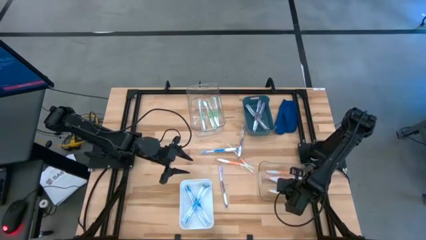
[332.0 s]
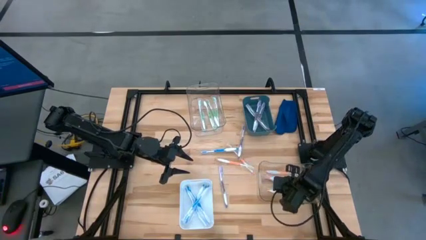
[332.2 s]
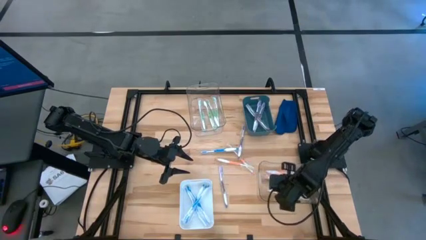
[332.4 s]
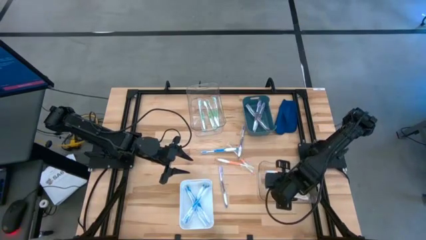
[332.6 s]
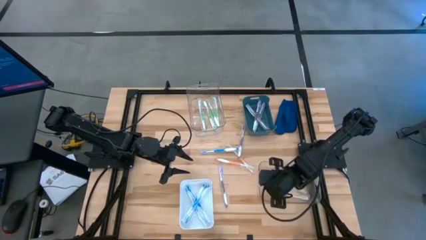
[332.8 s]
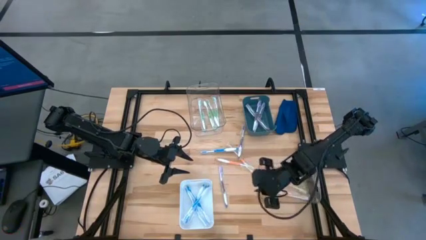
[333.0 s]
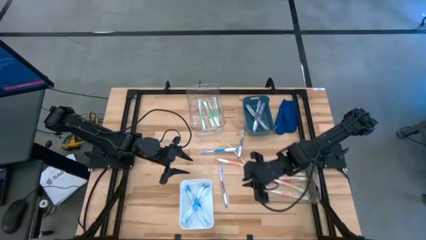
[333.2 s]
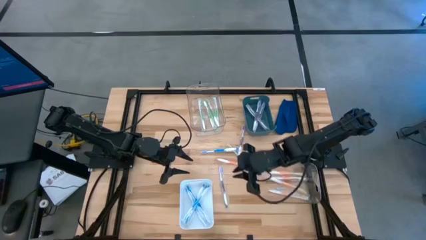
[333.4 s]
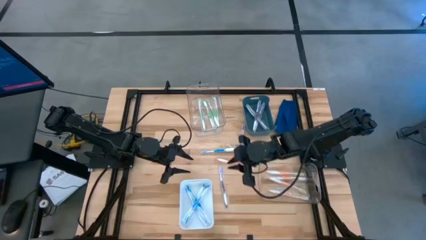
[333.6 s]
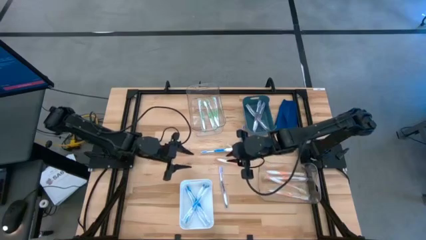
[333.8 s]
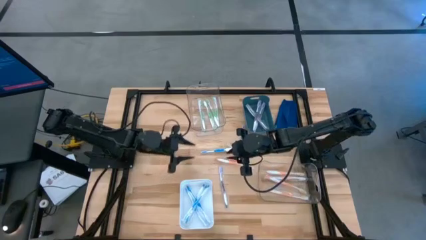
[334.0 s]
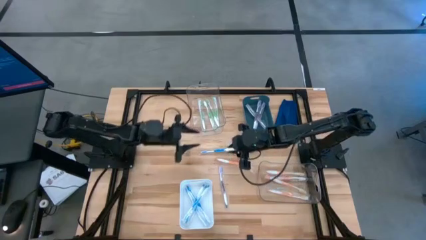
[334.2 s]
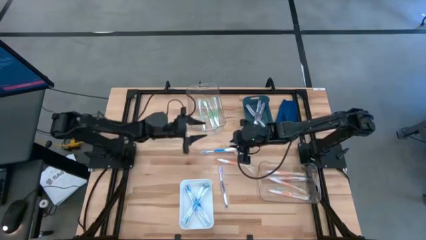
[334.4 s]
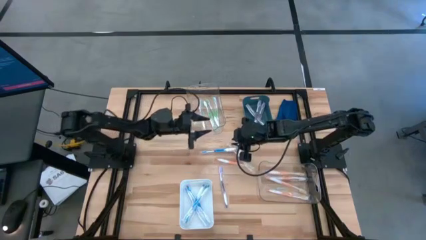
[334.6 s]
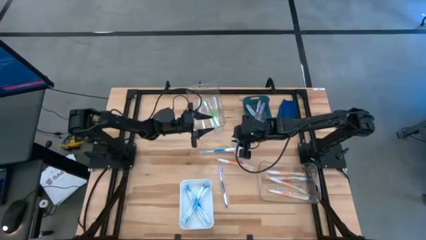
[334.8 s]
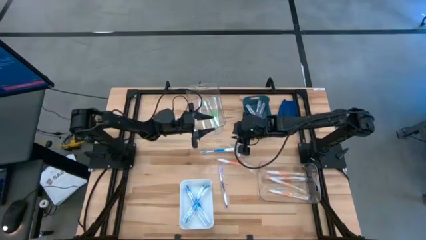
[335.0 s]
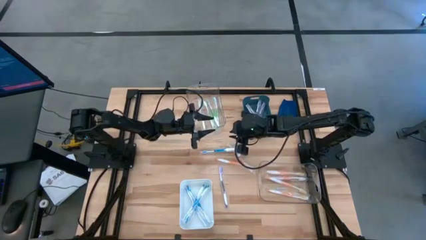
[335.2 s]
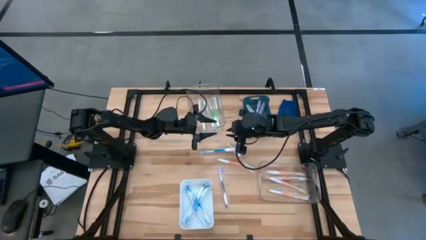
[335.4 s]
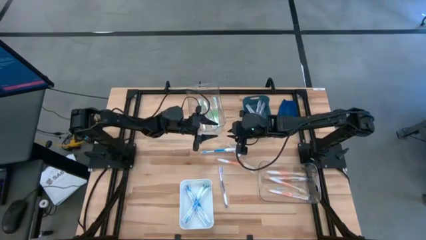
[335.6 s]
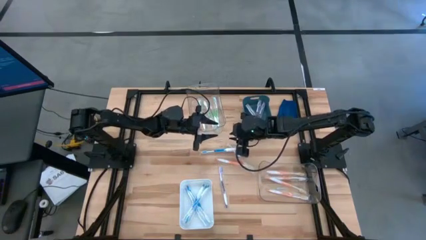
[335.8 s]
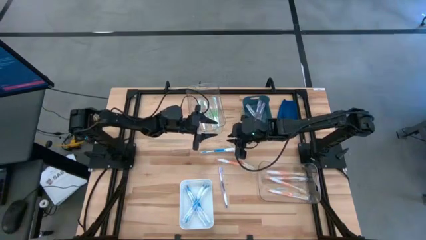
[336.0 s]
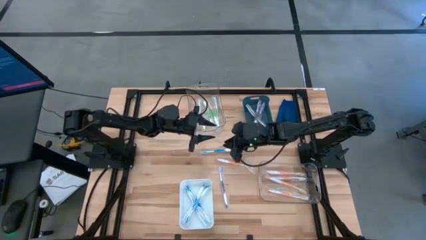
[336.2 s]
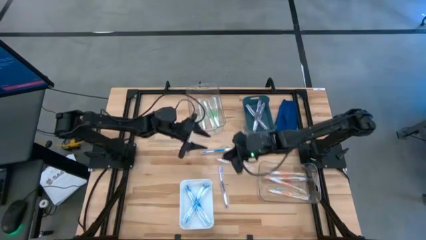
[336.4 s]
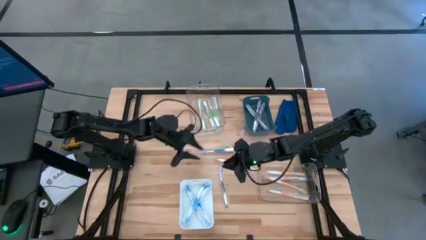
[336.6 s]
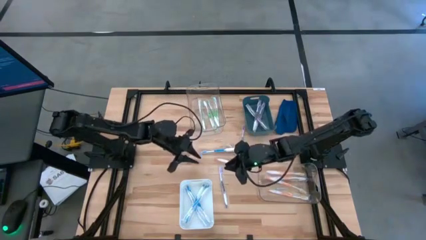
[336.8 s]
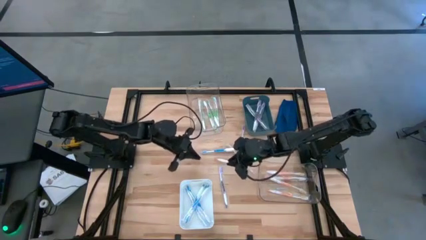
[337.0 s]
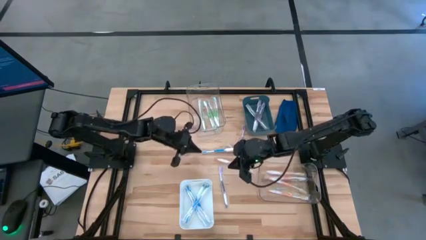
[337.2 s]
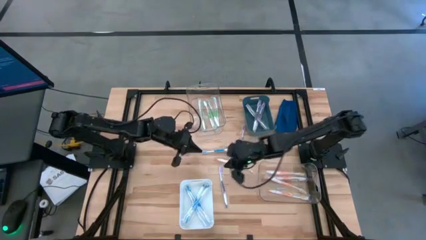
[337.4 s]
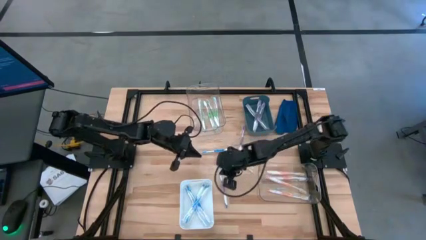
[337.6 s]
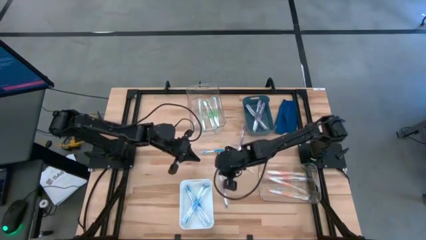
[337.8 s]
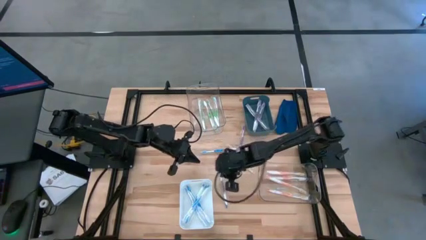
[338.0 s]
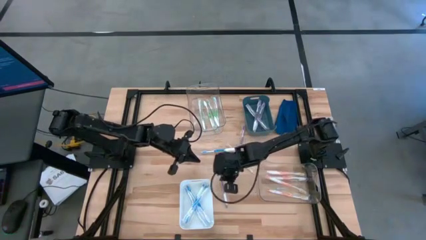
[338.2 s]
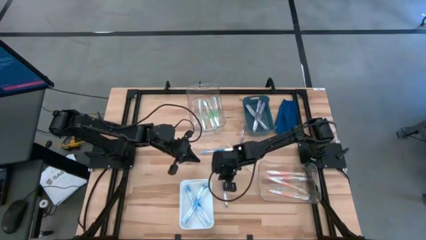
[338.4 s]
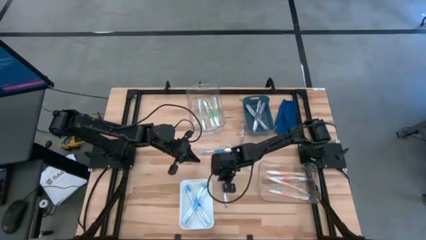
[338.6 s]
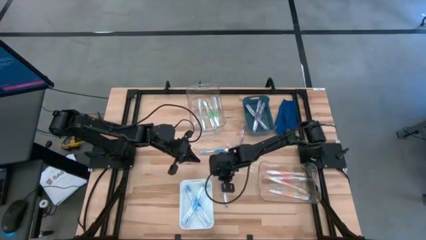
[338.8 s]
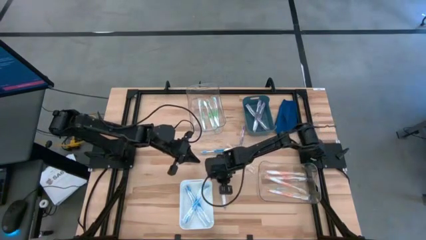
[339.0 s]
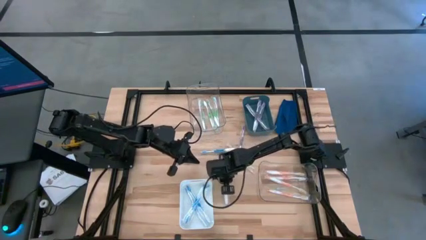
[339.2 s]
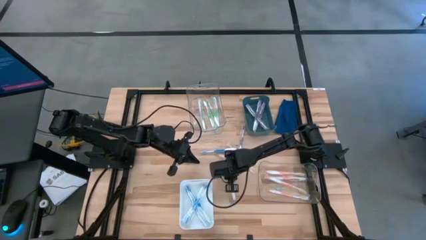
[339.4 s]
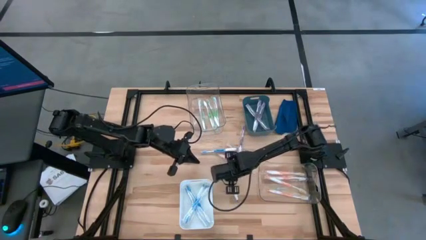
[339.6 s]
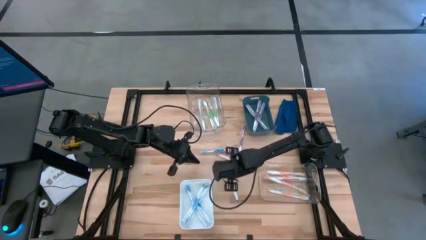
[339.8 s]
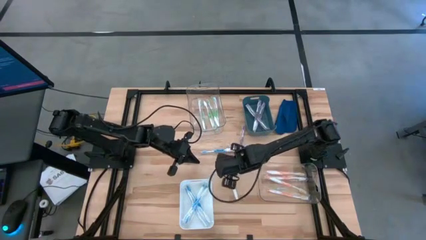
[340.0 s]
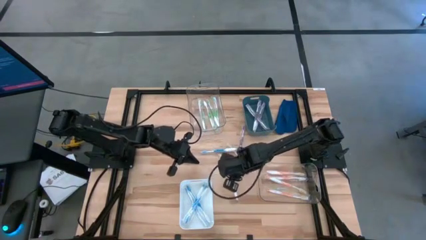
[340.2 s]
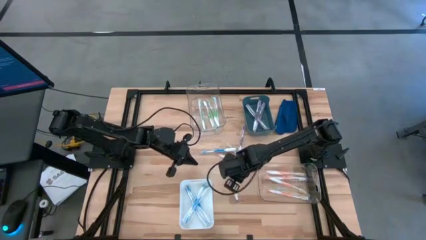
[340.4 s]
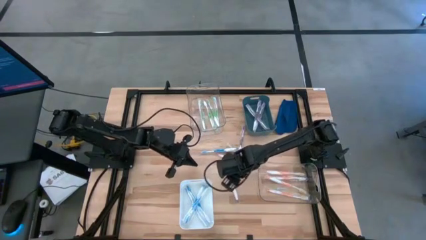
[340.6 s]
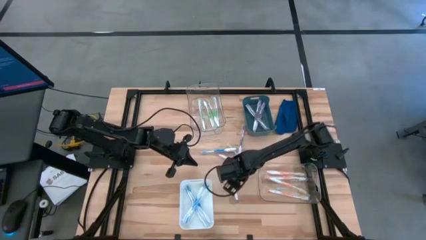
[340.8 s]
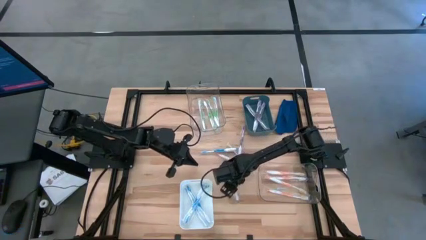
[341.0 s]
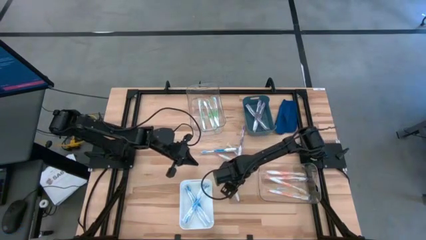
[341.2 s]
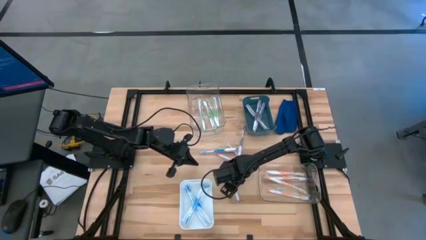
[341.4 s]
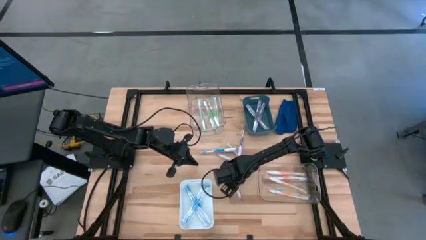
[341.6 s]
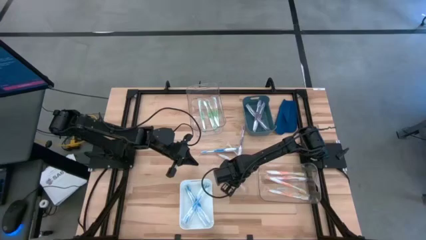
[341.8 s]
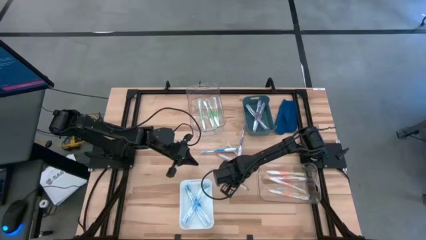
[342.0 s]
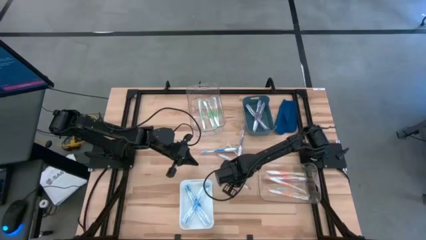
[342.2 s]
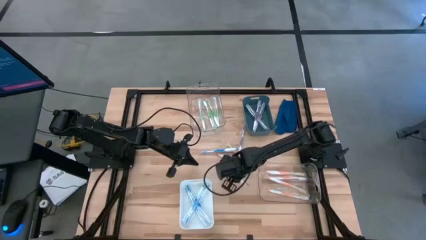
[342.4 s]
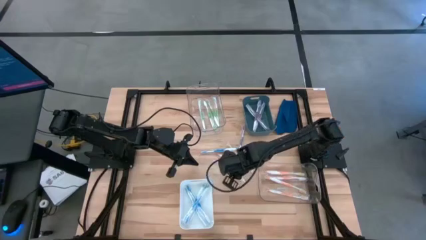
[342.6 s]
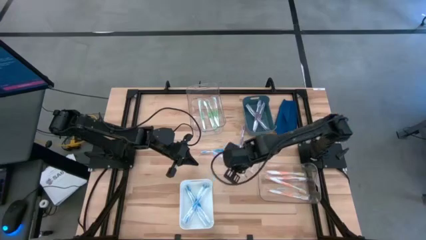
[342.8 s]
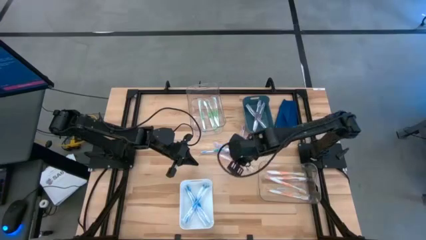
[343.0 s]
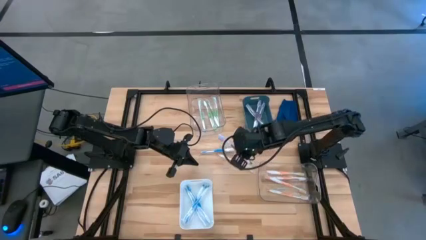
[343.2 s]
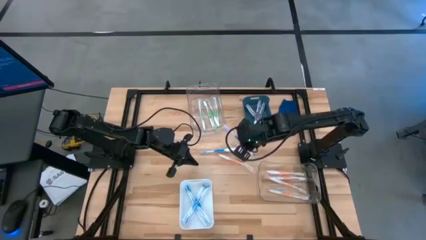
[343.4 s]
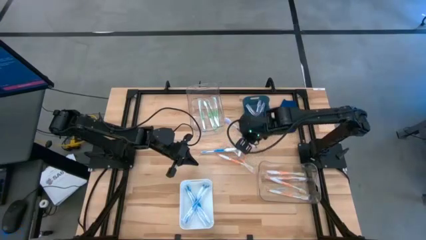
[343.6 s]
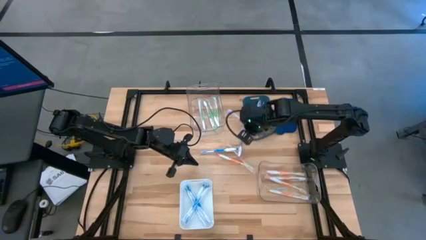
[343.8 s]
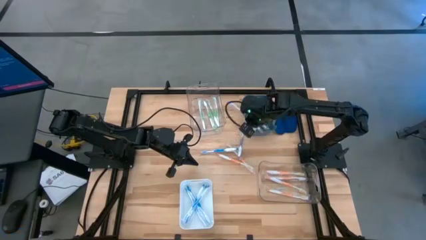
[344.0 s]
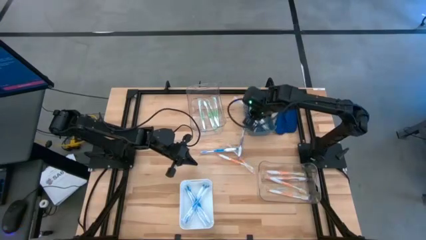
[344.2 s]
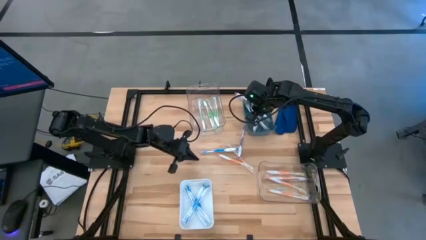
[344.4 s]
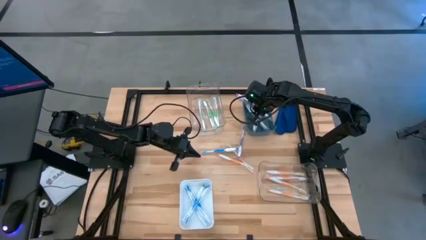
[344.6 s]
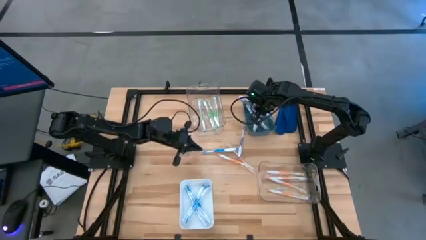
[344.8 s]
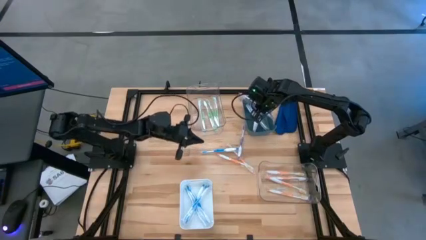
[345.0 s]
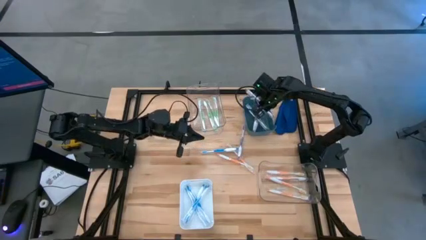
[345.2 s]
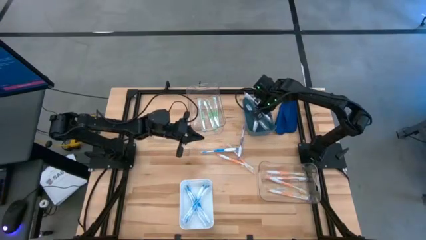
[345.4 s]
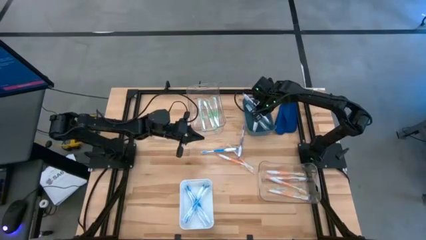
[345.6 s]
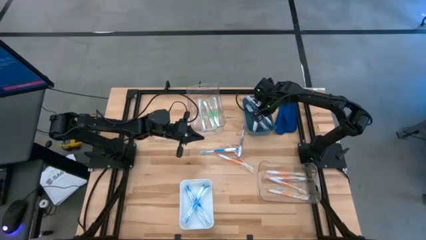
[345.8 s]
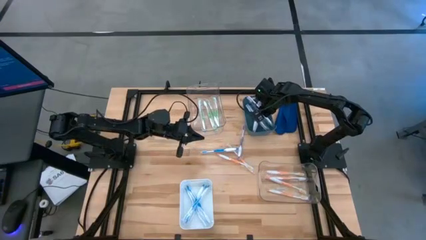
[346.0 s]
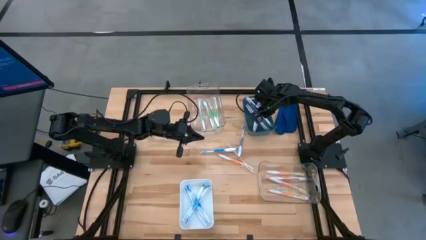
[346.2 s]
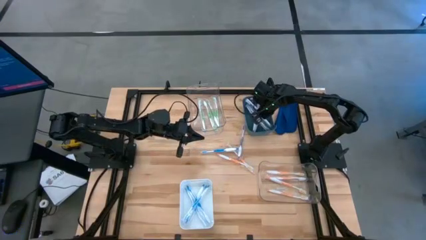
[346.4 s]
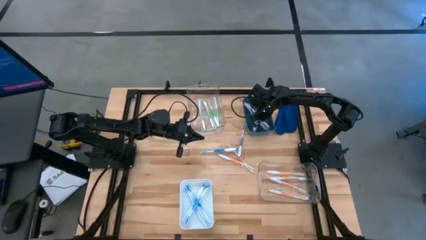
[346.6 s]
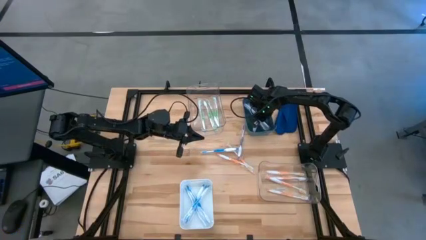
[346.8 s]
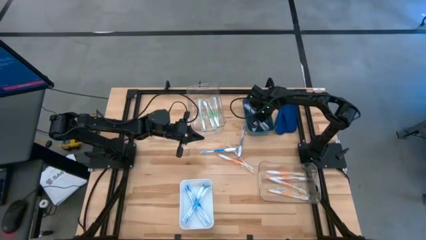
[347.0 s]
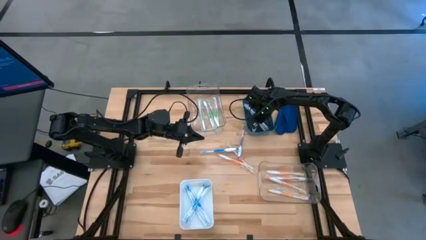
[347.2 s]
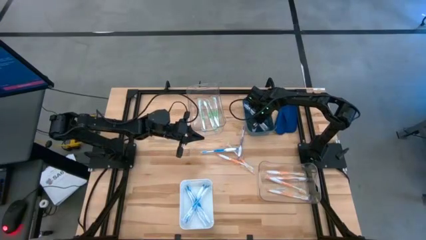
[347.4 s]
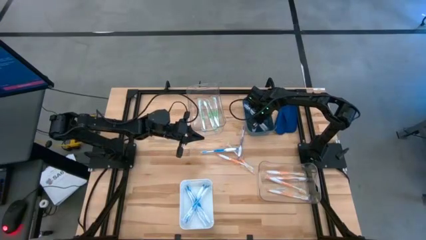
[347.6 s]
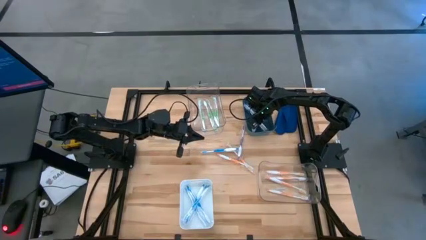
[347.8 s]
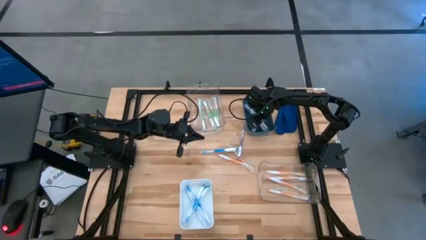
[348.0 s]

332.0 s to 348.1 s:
Task: Pick & Place Toothbrushes
Put the purple toothbrush into the green bin
